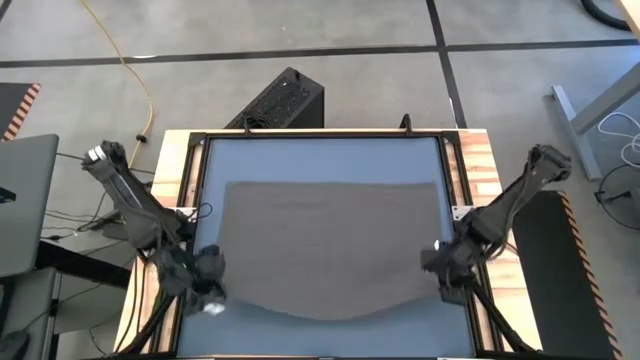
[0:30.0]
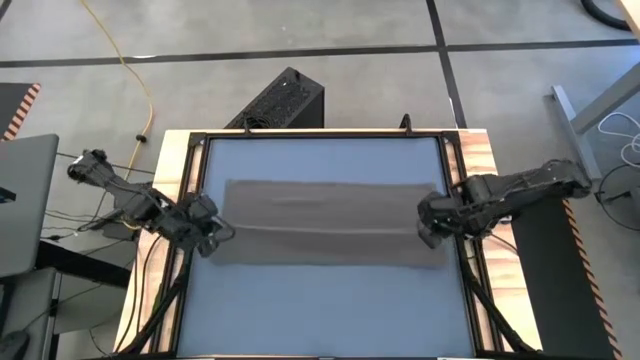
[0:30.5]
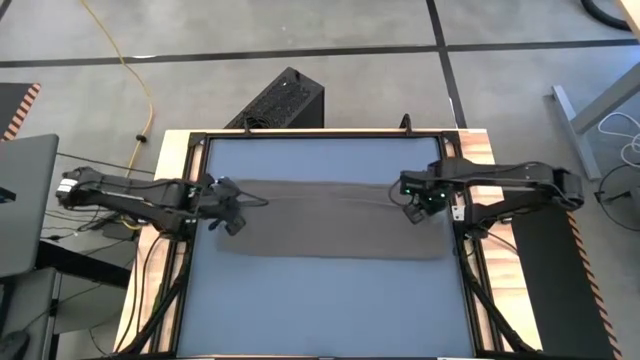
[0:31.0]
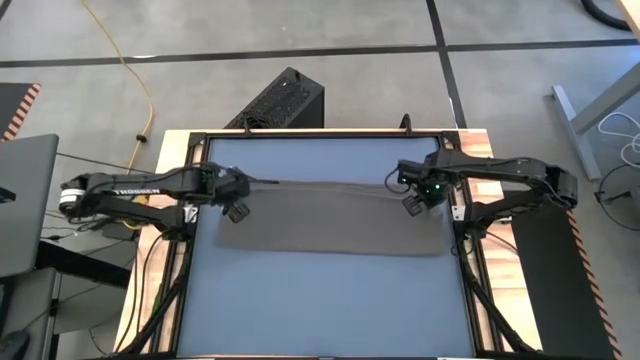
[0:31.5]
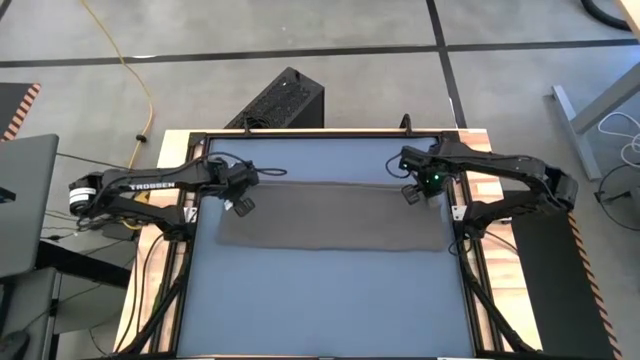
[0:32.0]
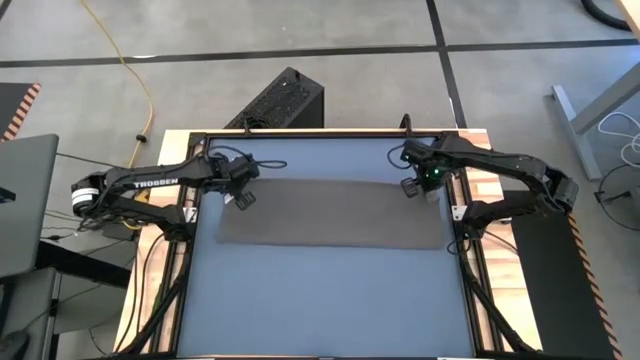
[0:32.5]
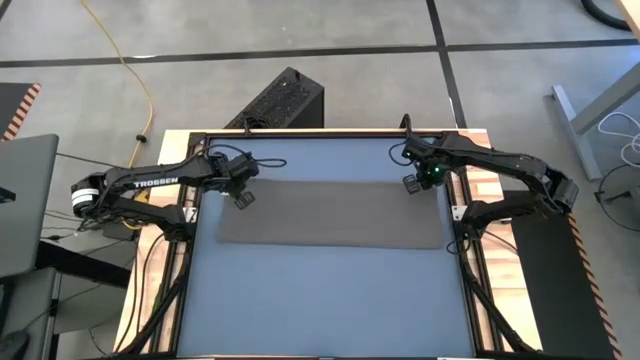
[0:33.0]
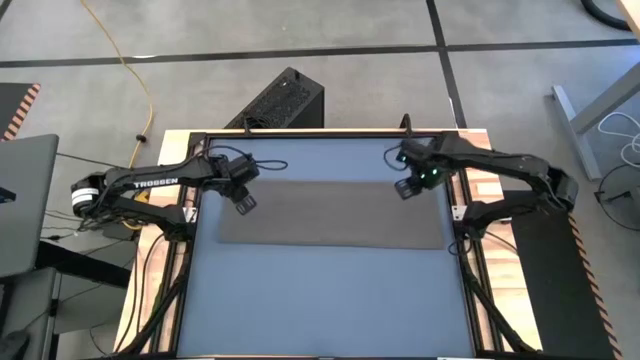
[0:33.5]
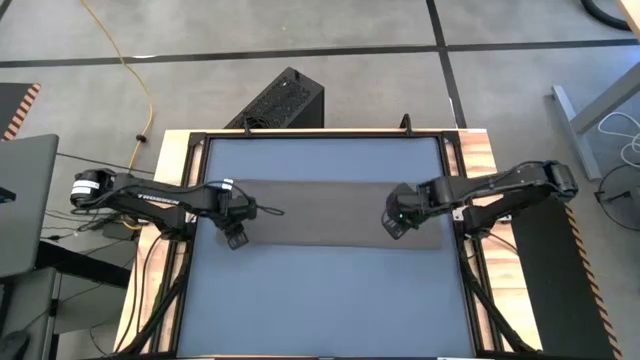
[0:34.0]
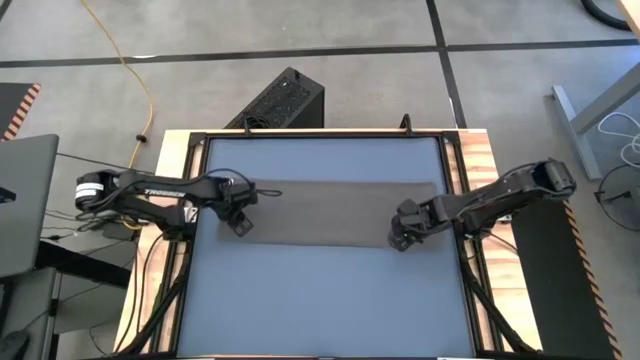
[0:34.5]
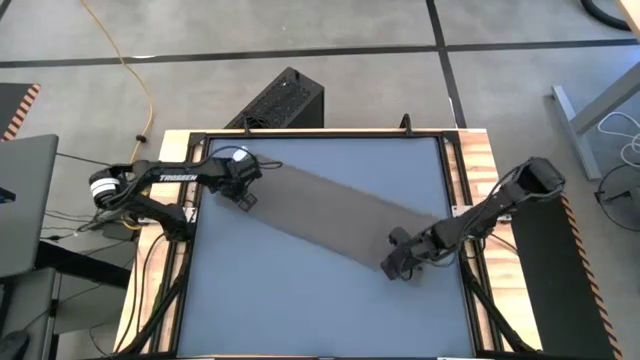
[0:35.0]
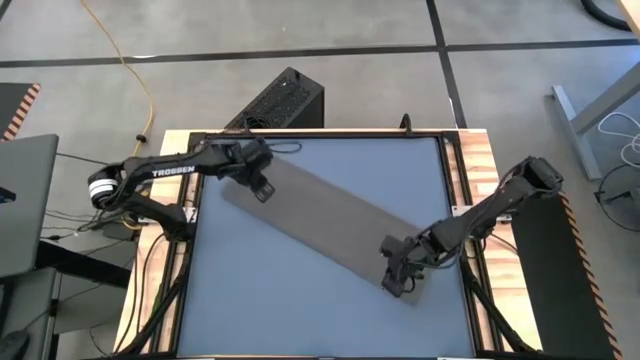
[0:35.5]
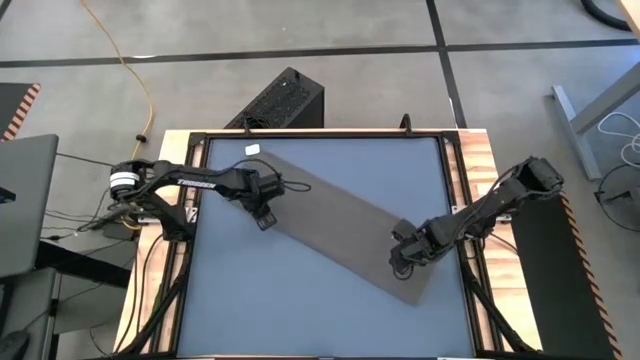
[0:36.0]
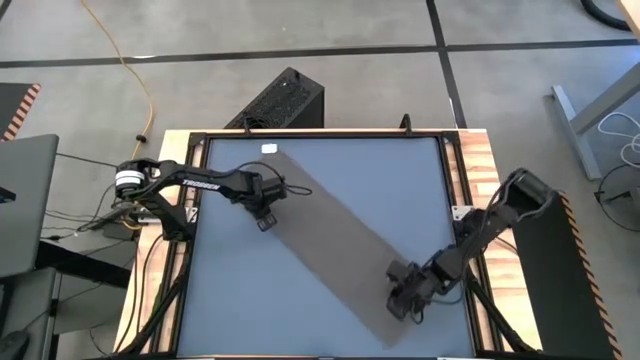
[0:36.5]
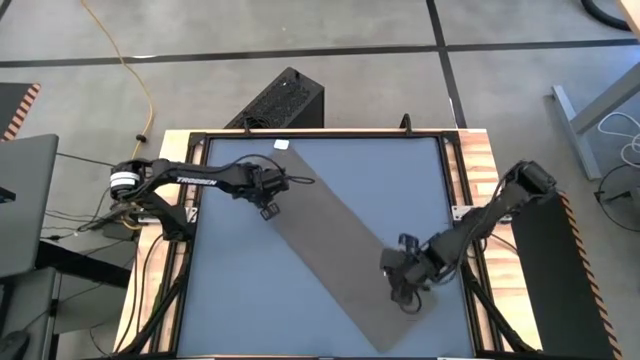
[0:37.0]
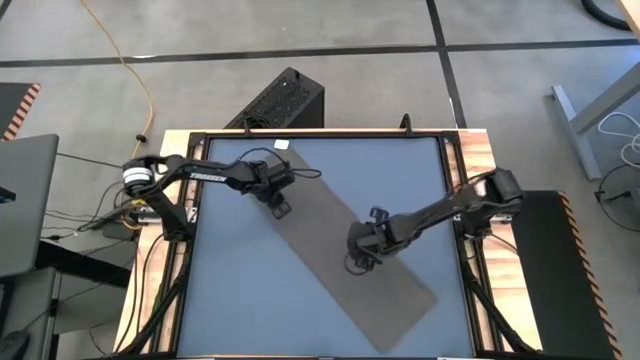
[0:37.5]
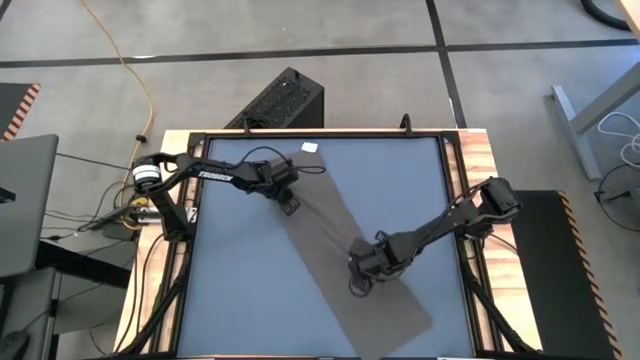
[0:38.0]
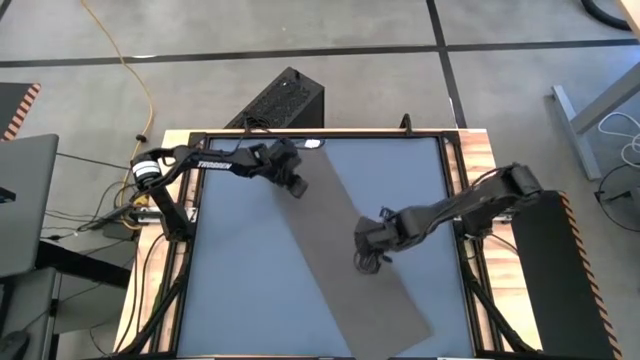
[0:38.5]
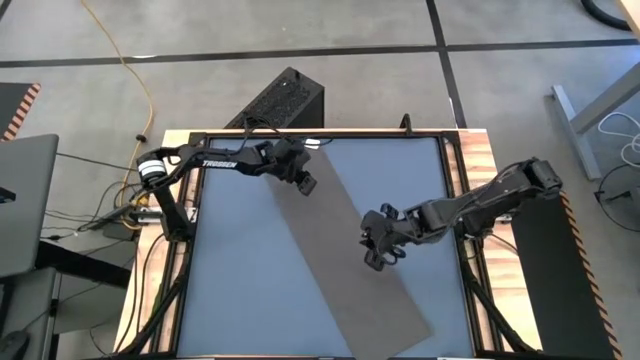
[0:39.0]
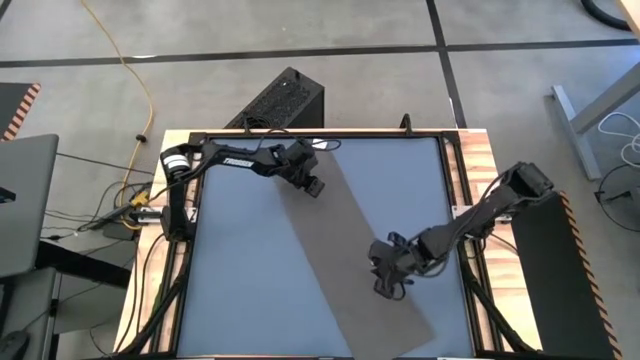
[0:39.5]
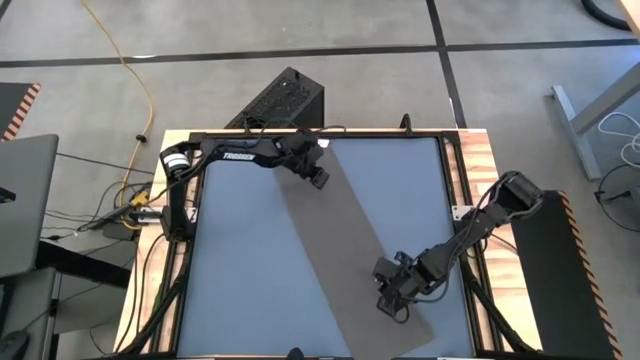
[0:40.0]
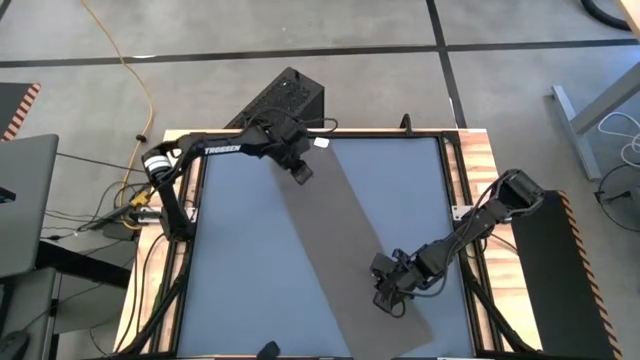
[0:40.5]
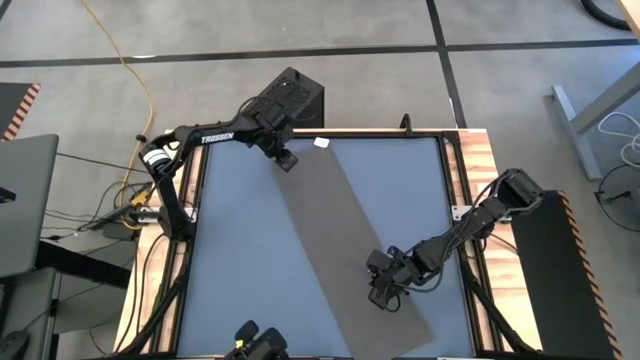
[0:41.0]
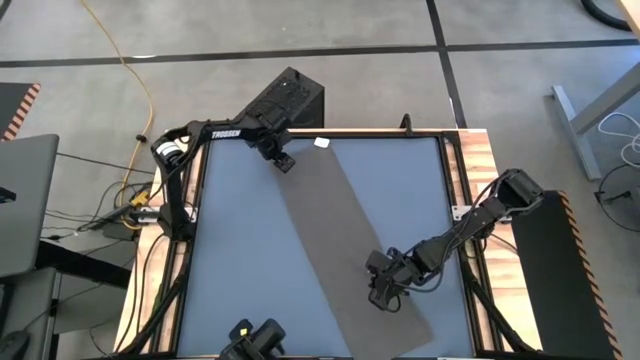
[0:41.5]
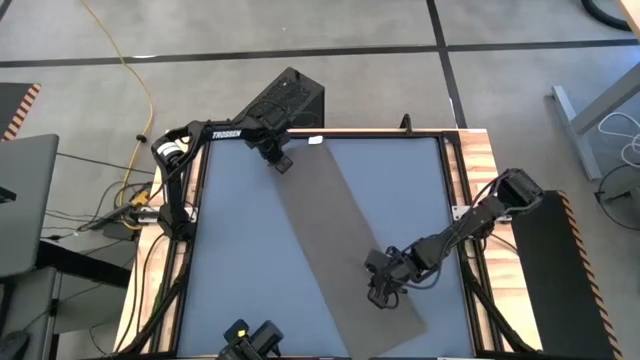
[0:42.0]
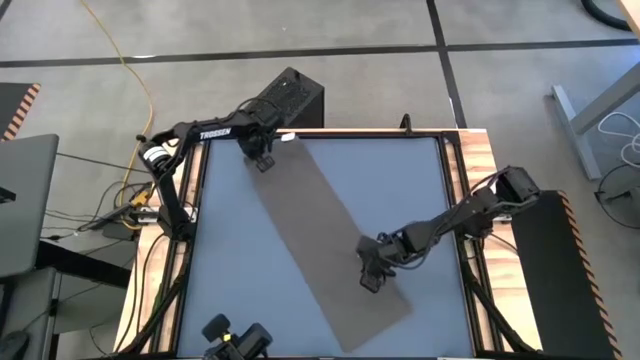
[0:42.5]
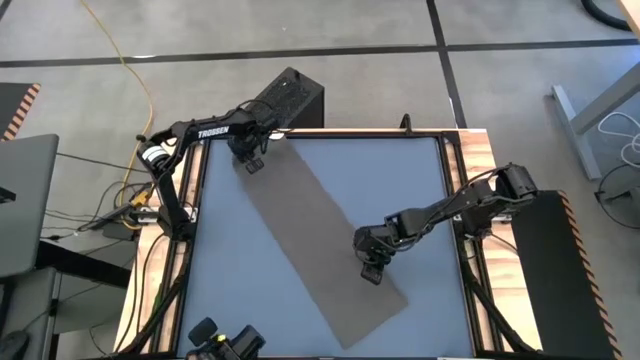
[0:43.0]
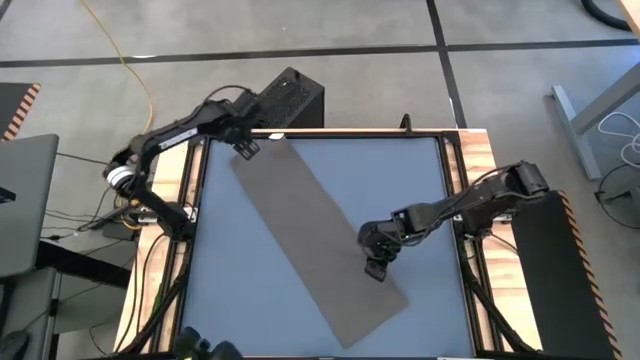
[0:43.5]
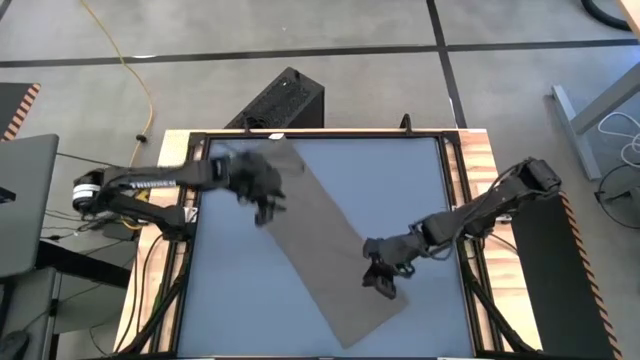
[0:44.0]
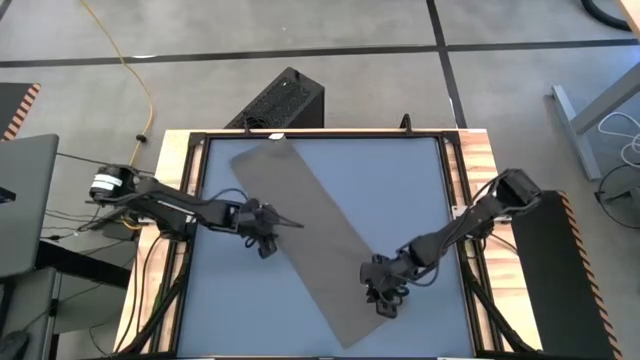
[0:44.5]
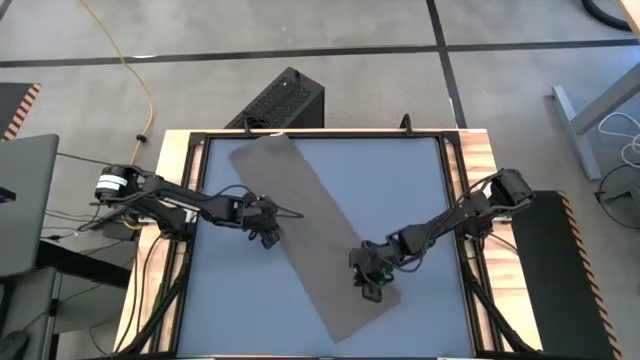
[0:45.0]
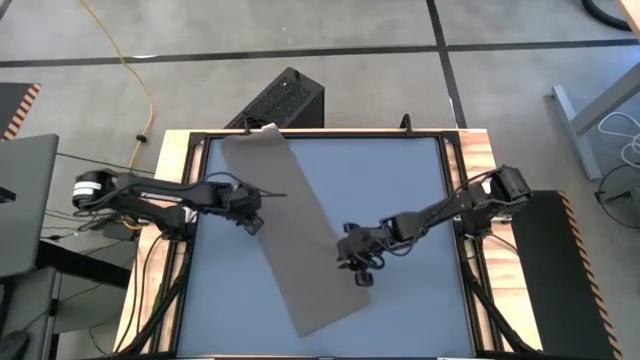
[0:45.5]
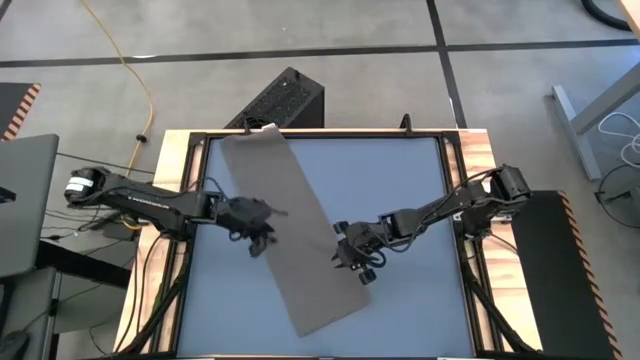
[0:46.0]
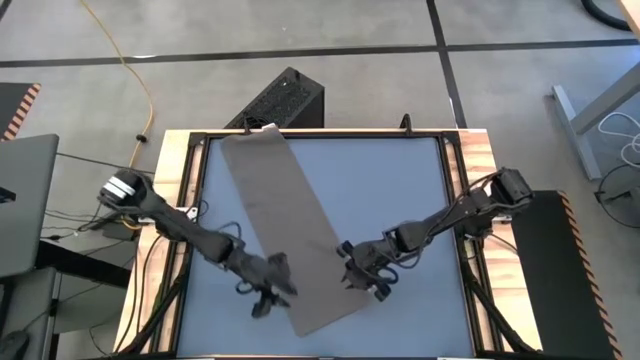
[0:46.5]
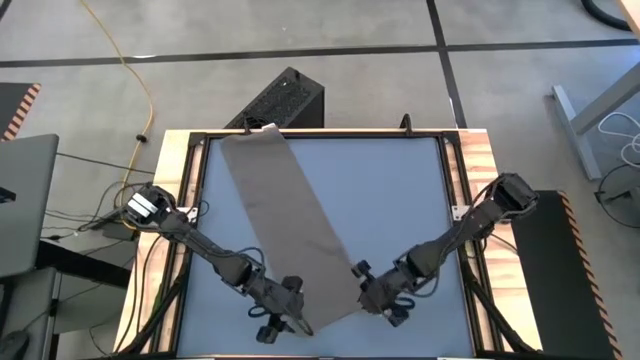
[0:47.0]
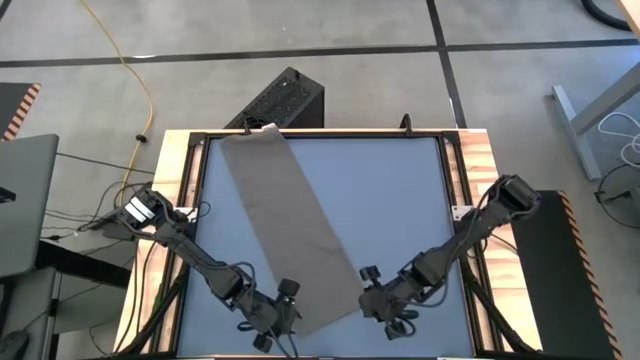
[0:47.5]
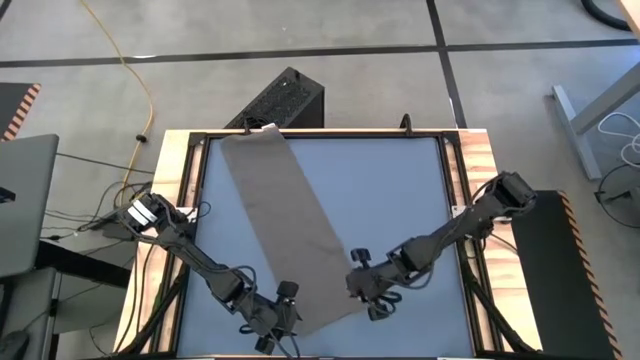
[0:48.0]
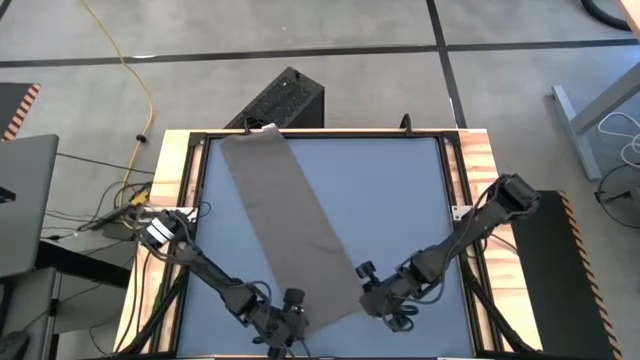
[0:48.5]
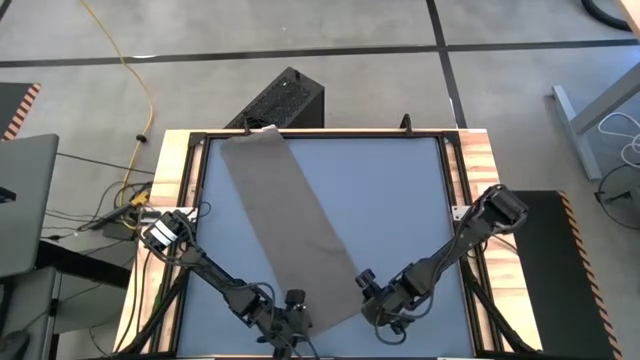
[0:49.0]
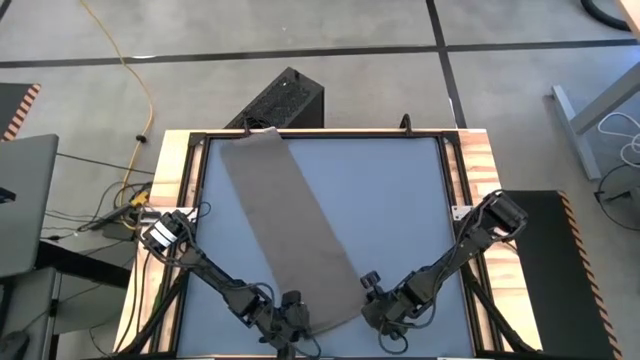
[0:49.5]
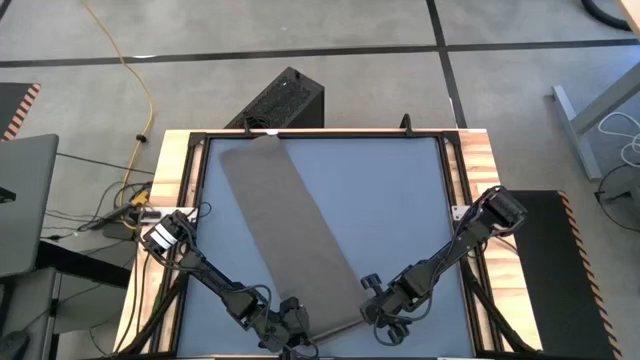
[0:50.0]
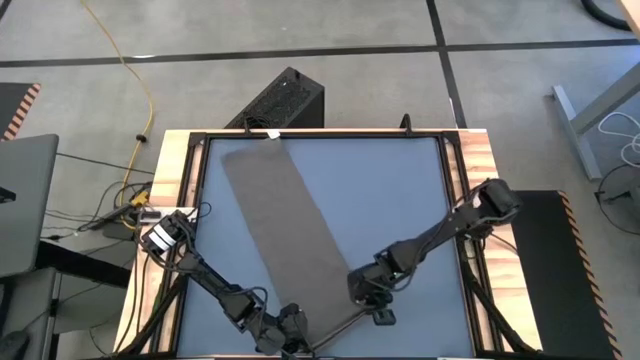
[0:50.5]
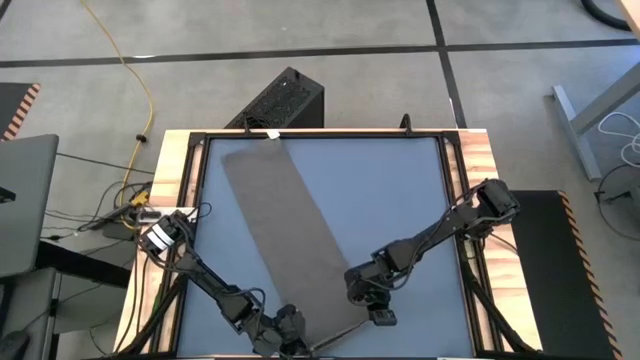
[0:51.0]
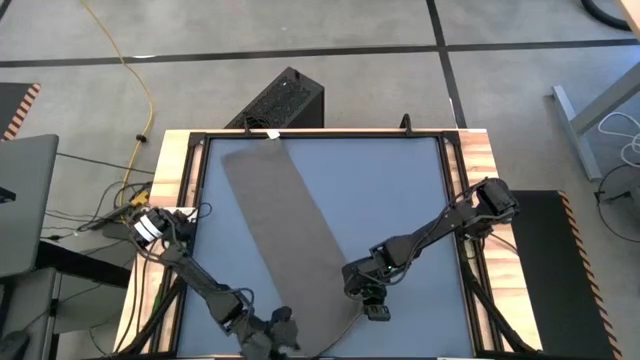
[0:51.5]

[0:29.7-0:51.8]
Task: Roll towel
Roll the grey towel
